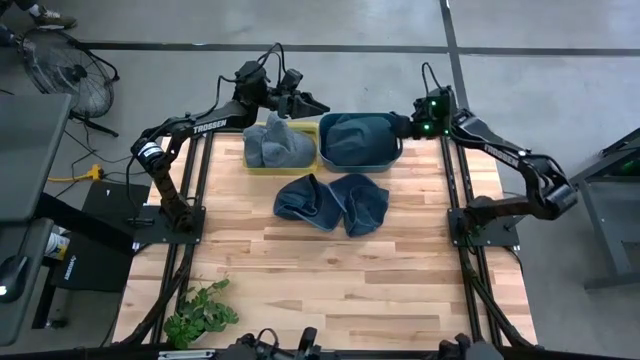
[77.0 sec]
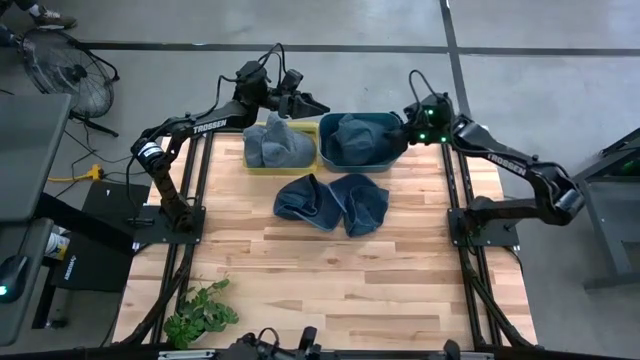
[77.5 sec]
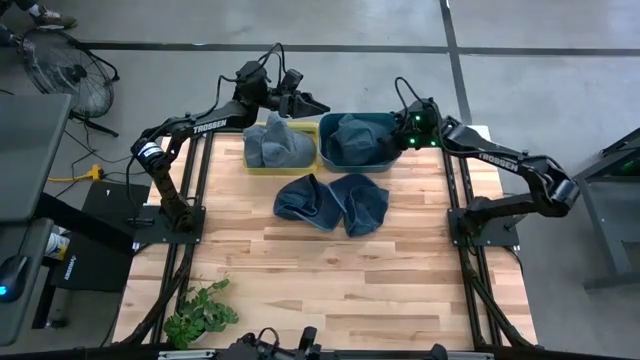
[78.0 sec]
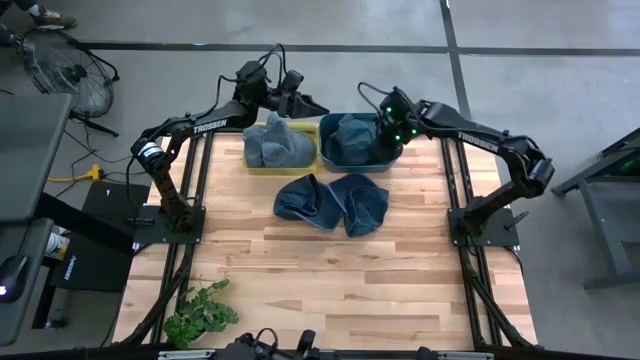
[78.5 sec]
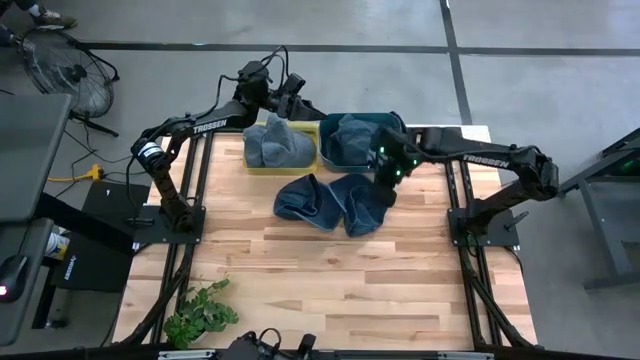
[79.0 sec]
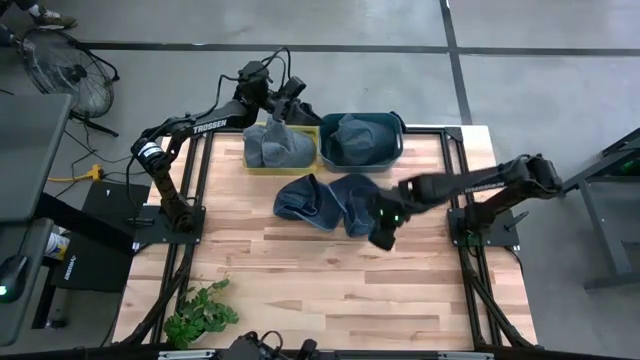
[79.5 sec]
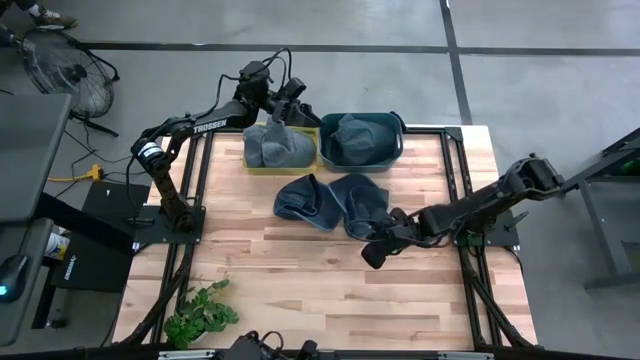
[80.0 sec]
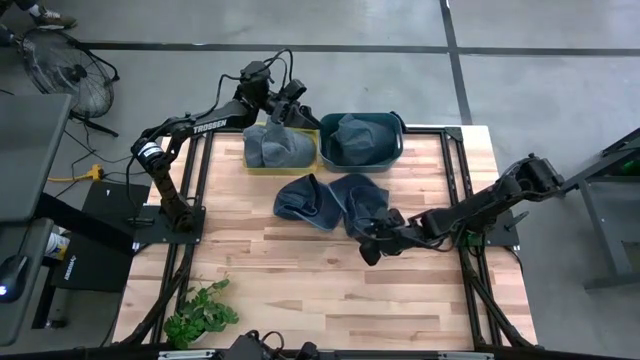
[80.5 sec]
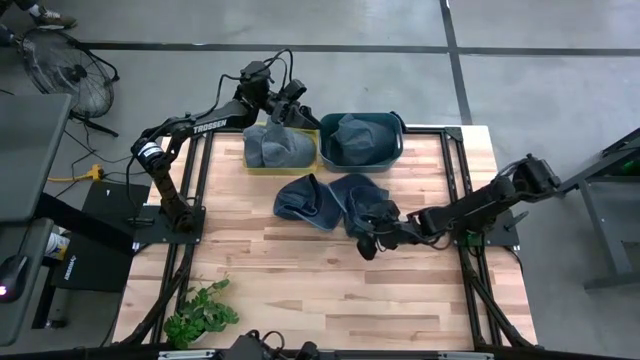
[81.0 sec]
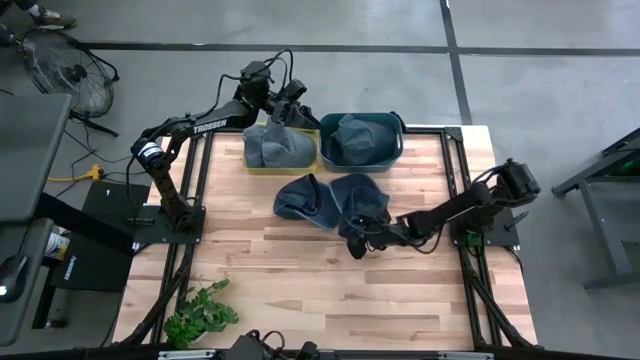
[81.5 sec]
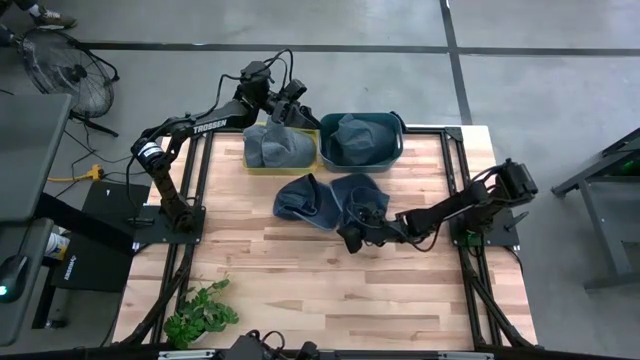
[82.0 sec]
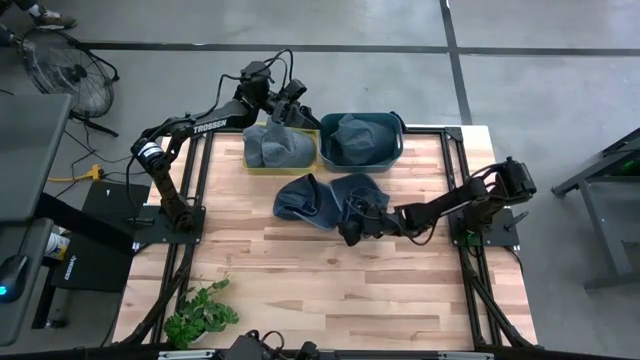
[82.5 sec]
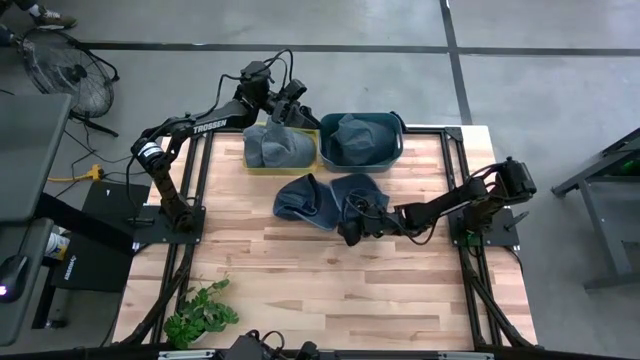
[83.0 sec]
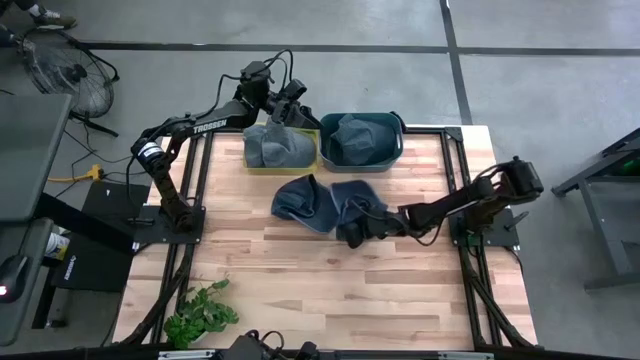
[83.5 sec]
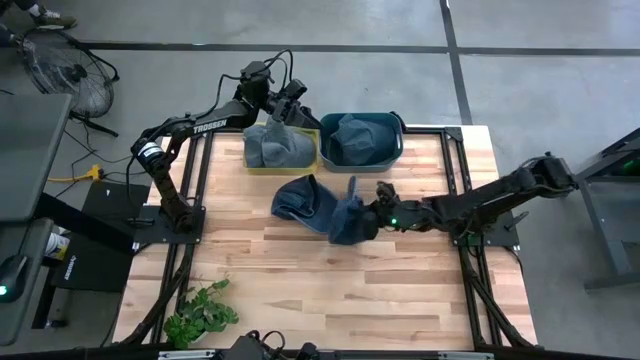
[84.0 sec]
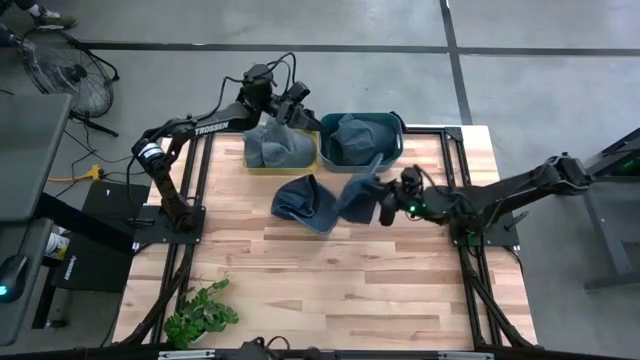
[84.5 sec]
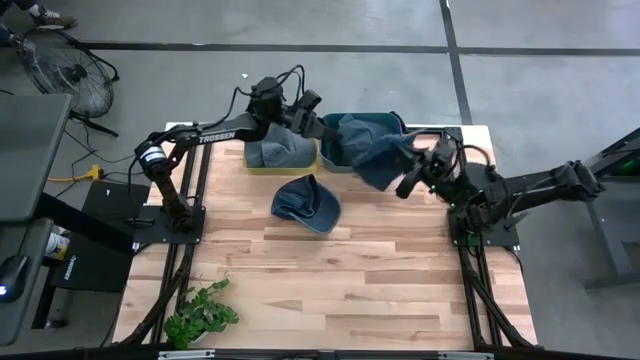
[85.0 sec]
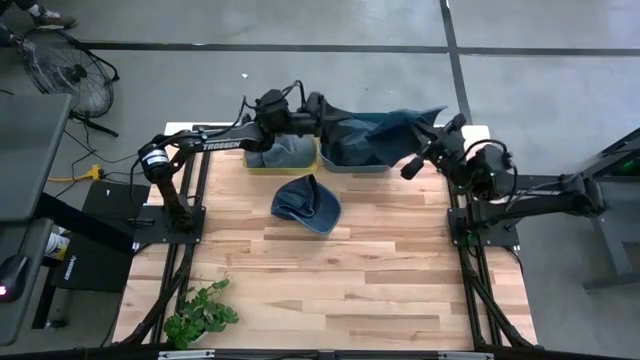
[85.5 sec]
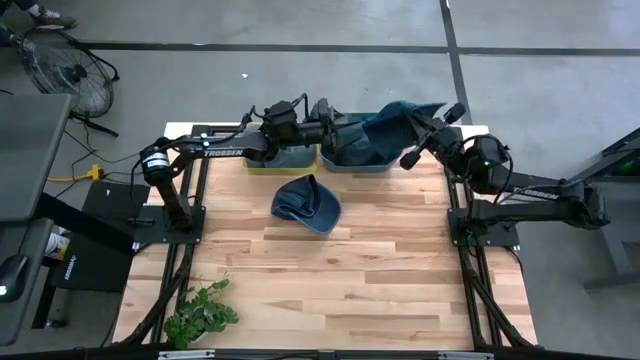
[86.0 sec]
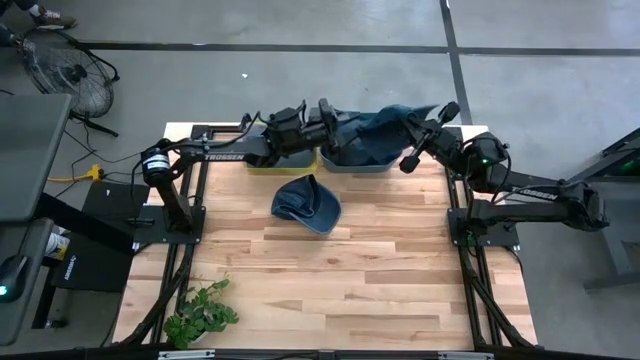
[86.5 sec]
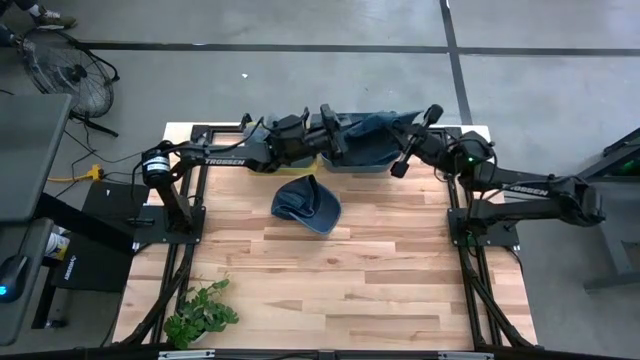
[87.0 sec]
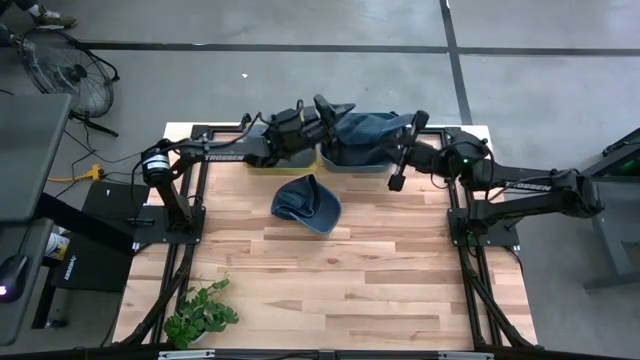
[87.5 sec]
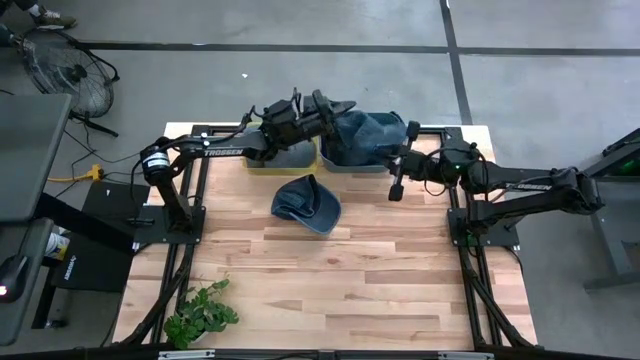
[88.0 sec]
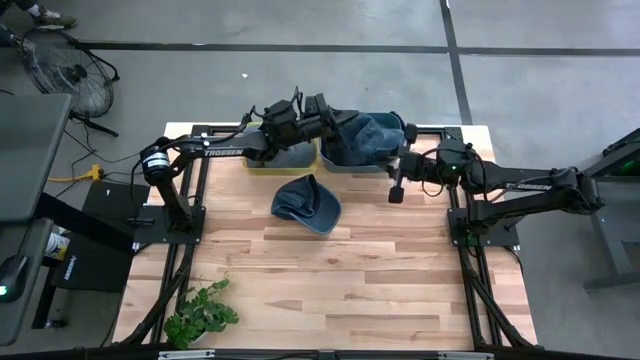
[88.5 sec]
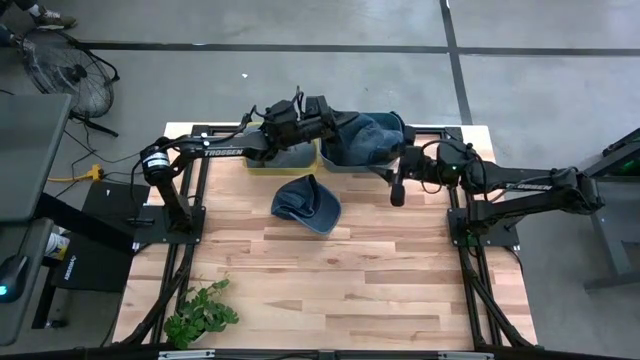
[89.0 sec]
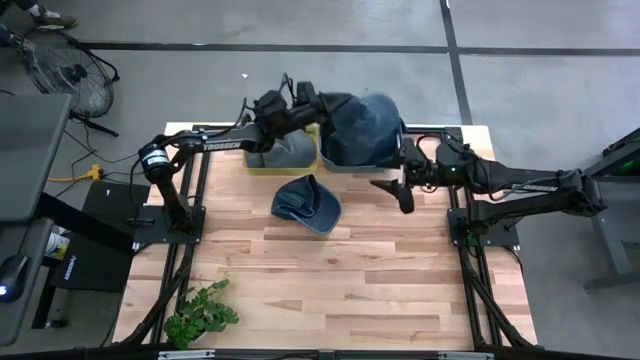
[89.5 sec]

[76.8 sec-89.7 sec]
Task: Pick & Place hat
Put the right blue cap into the blue bin

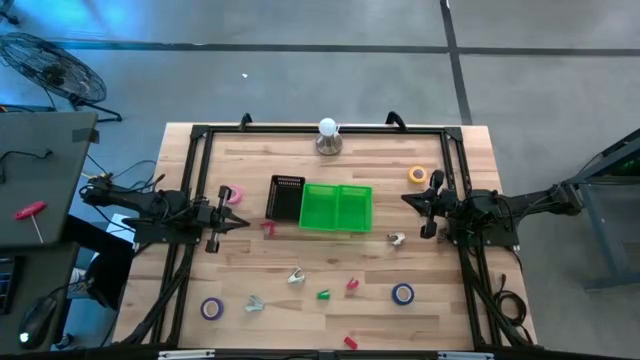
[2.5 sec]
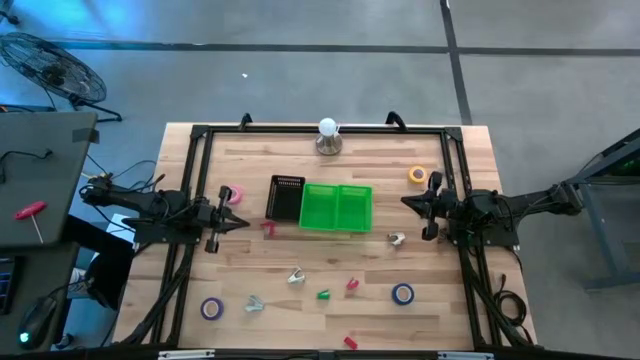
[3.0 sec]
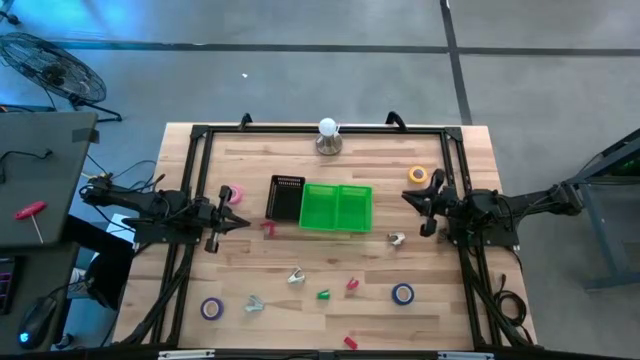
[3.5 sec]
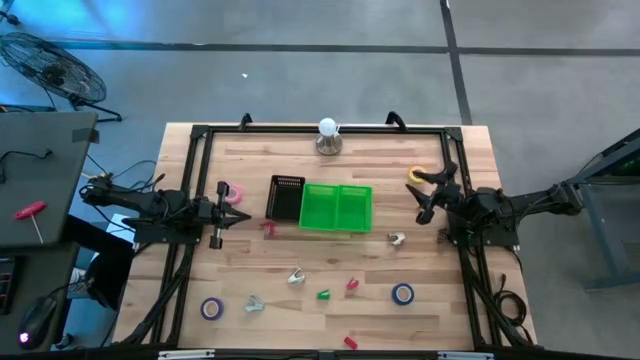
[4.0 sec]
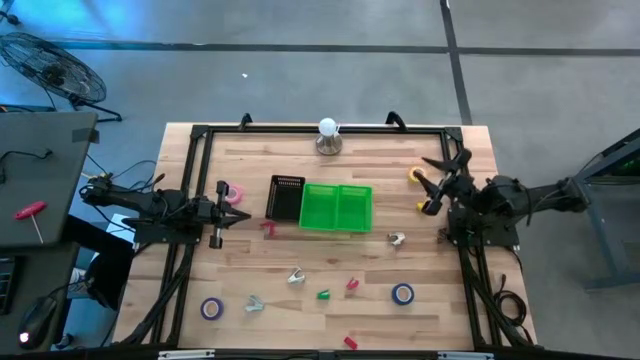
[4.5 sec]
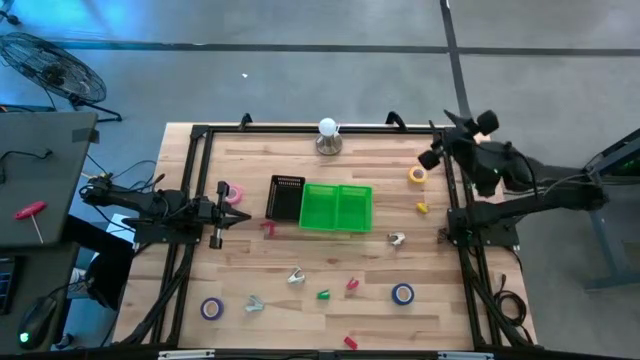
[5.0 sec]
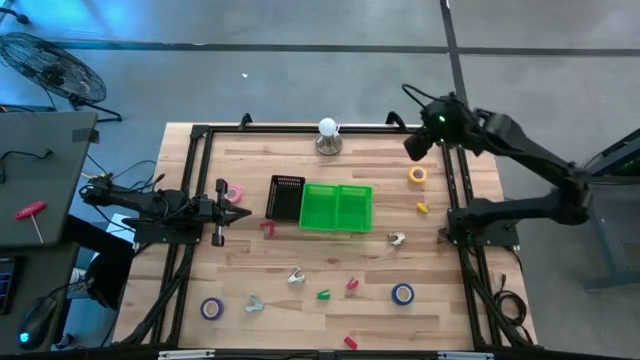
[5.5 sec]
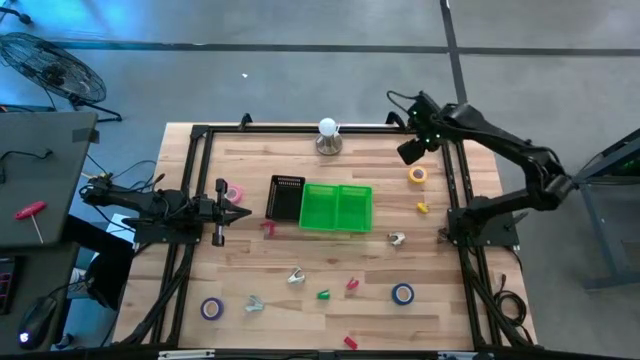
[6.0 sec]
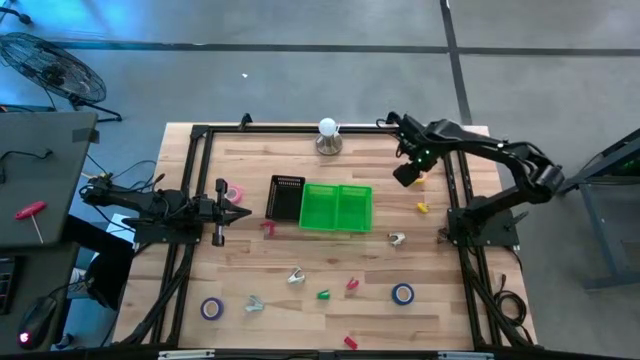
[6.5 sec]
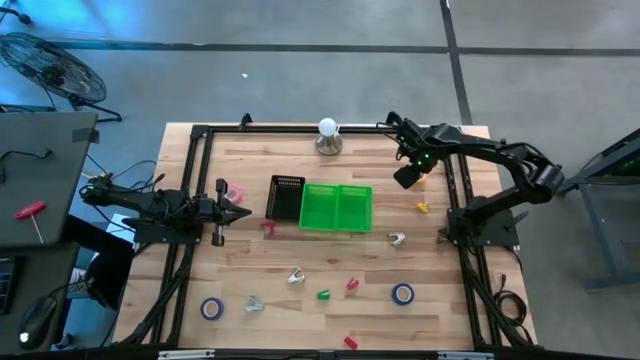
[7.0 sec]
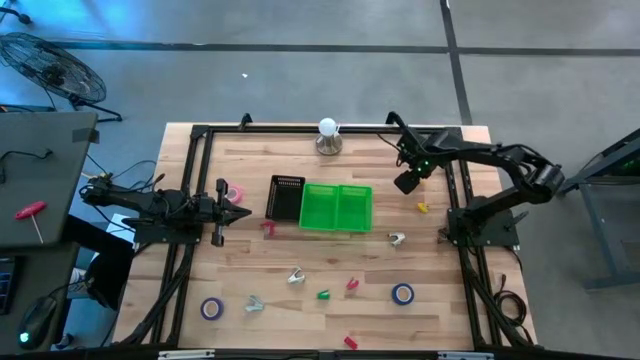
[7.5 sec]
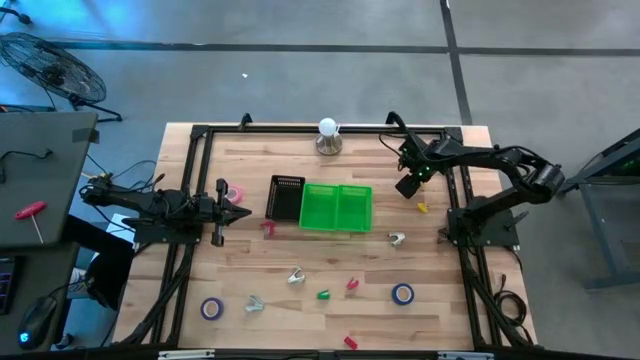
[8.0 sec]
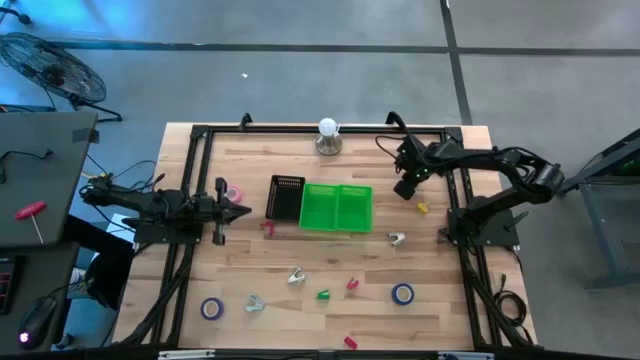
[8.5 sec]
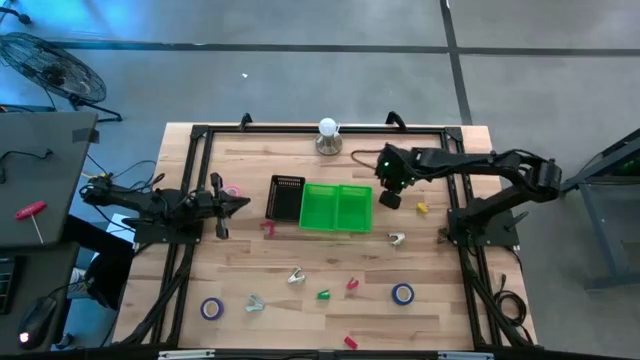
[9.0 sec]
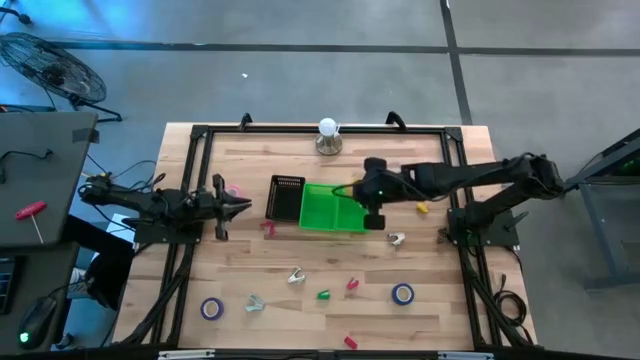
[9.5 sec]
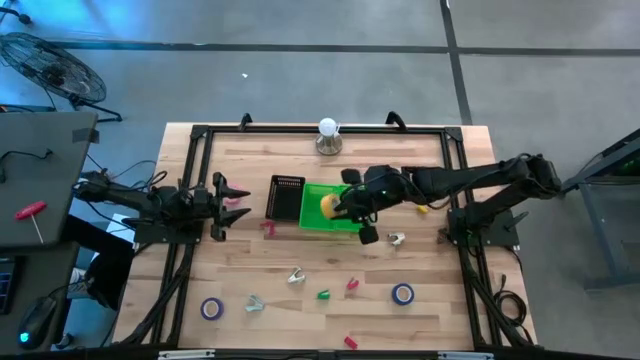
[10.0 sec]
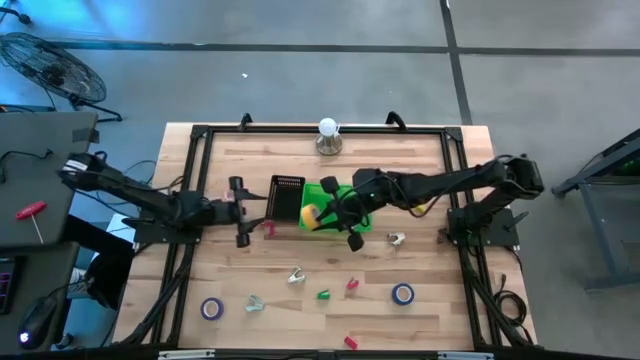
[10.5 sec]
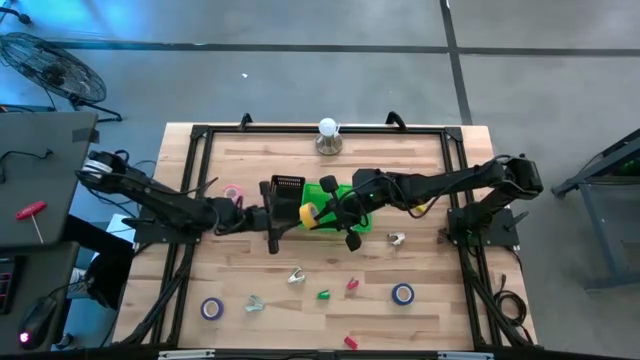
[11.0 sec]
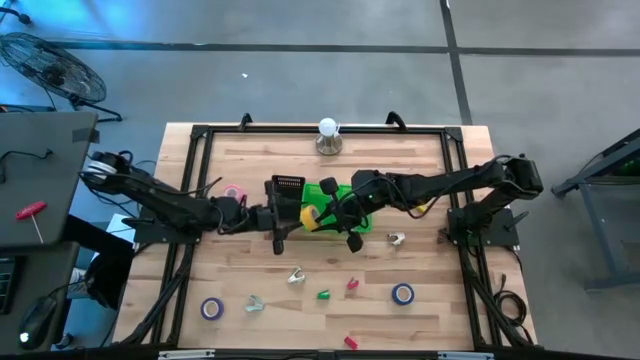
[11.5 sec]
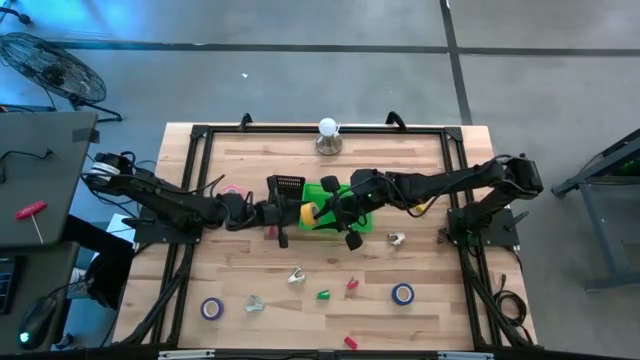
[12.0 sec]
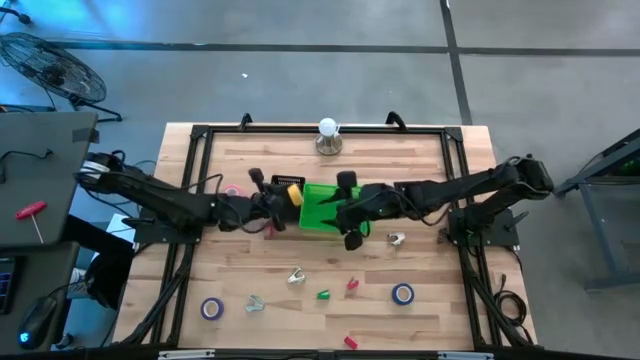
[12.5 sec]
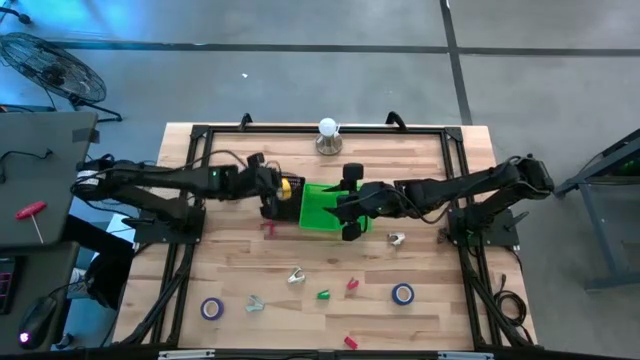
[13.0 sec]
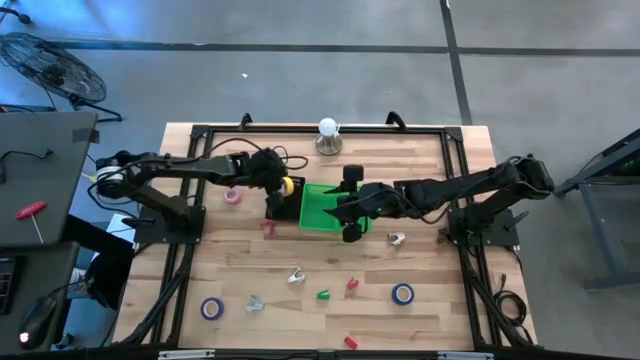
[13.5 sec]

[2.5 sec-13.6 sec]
Task: Pick and place Stapler, Stapler remover, tape
Put the yellow tape into the black bin
